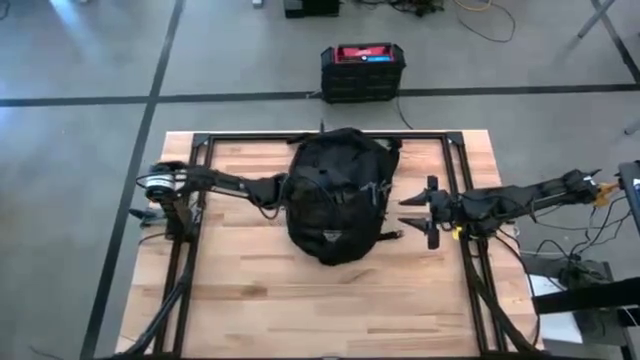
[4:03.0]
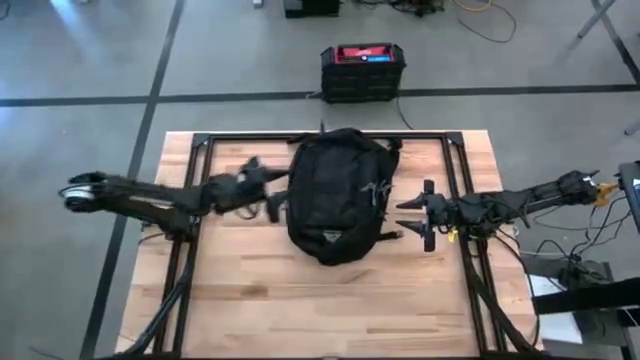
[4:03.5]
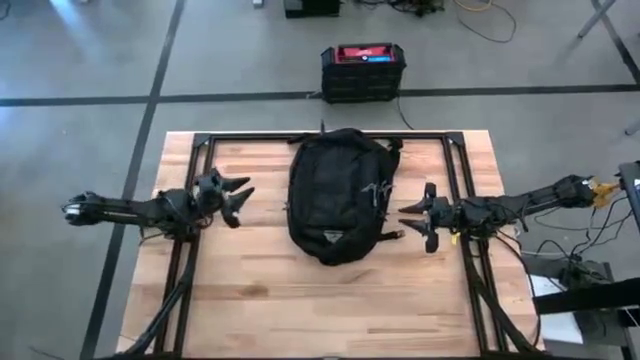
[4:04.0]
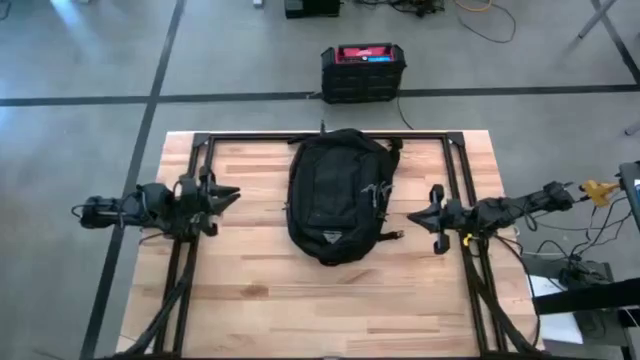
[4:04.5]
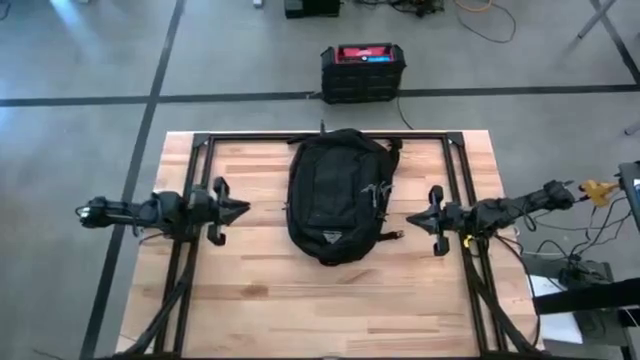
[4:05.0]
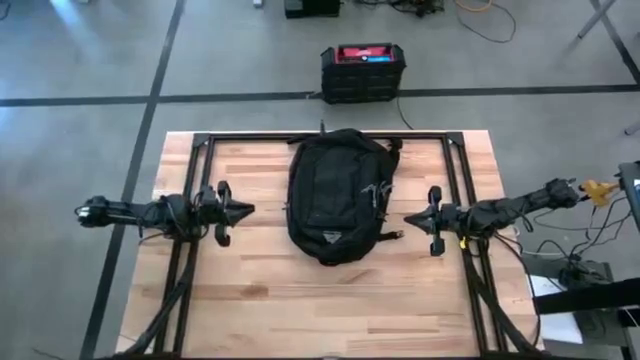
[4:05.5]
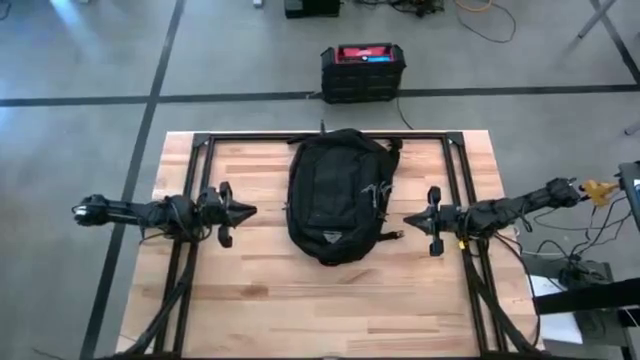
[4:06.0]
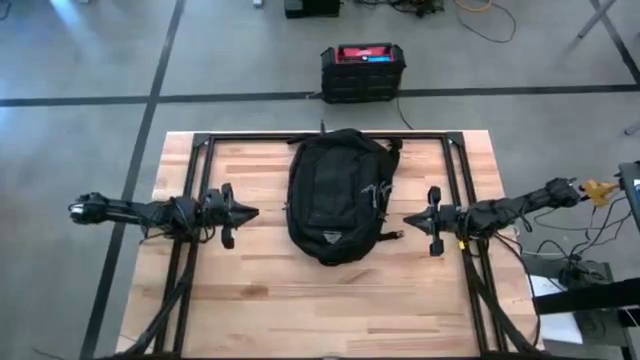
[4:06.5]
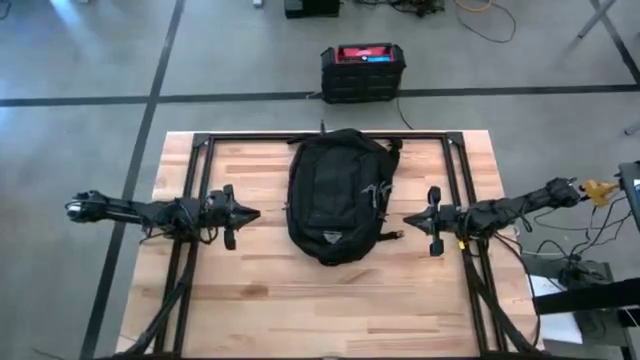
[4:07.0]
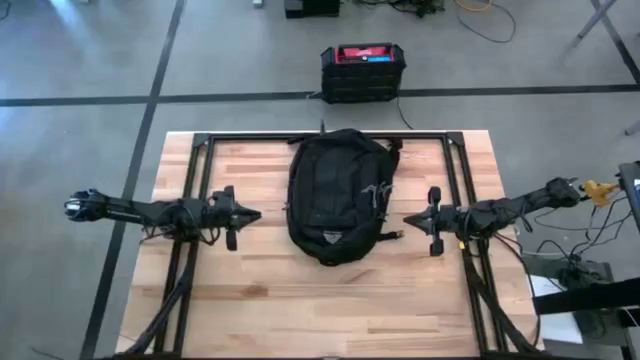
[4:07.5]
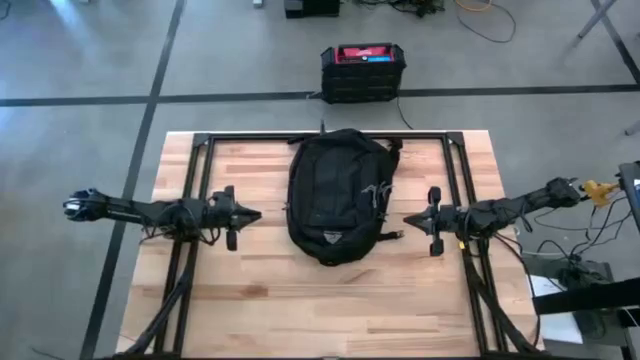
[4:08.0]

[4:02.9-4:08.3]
Task: Unpack backpack
Return to Home Position

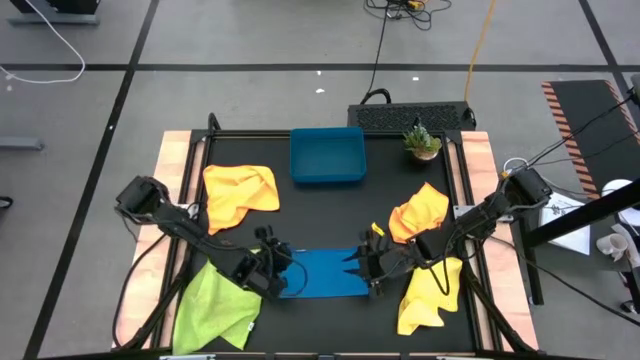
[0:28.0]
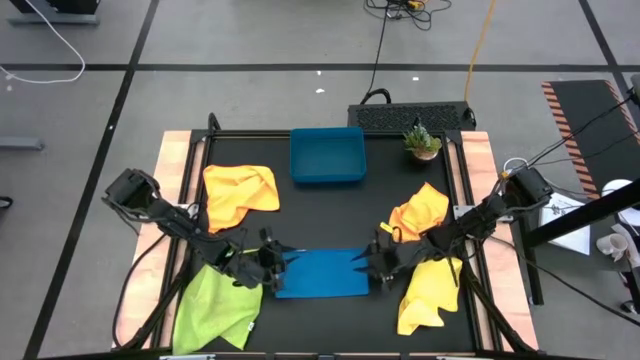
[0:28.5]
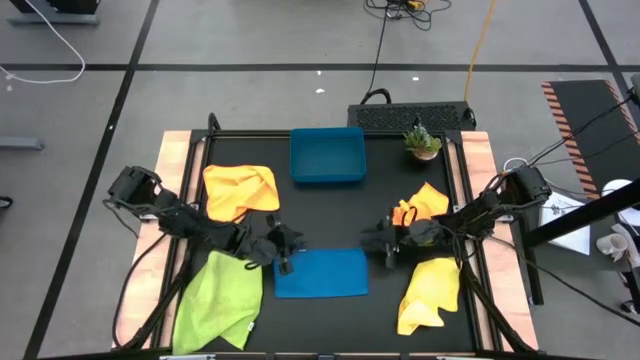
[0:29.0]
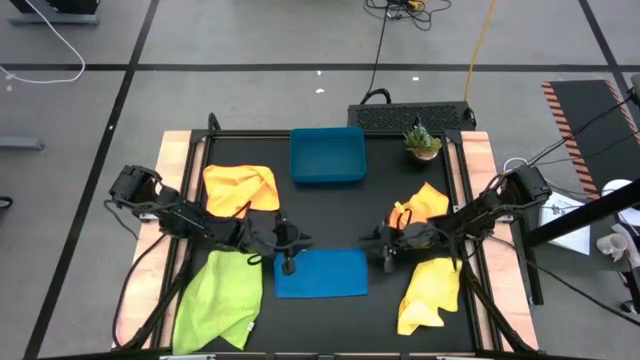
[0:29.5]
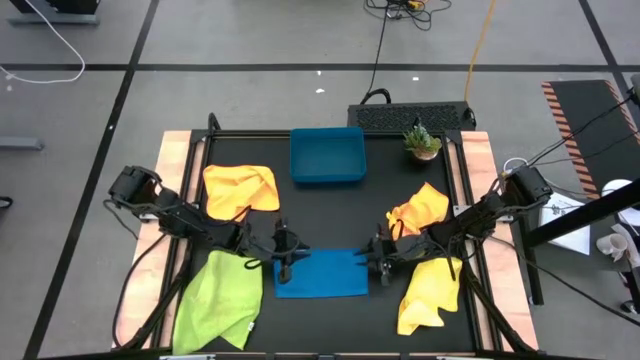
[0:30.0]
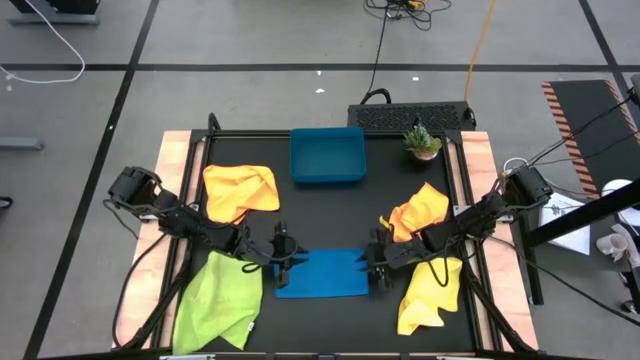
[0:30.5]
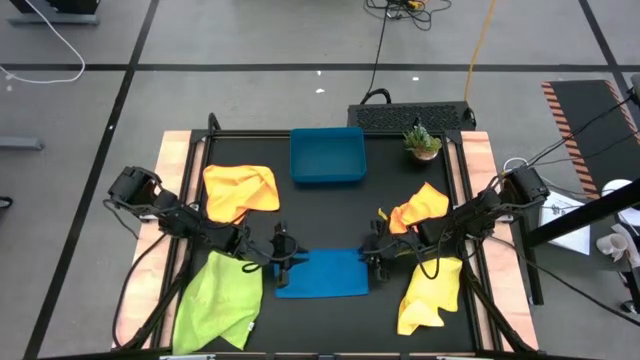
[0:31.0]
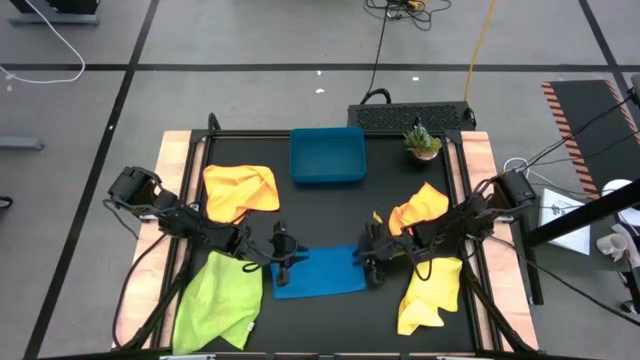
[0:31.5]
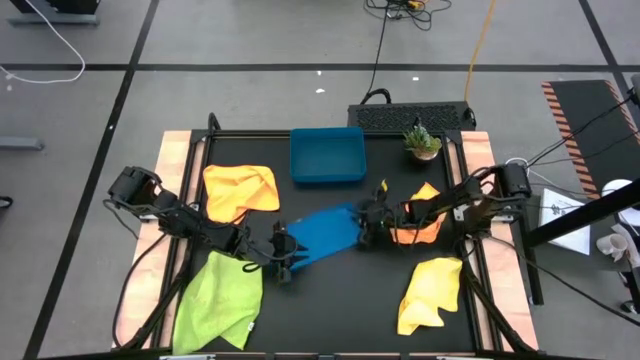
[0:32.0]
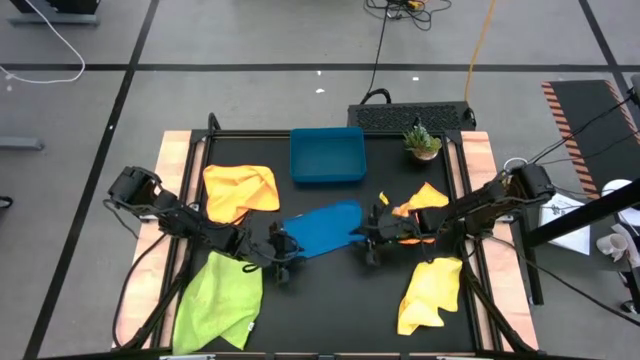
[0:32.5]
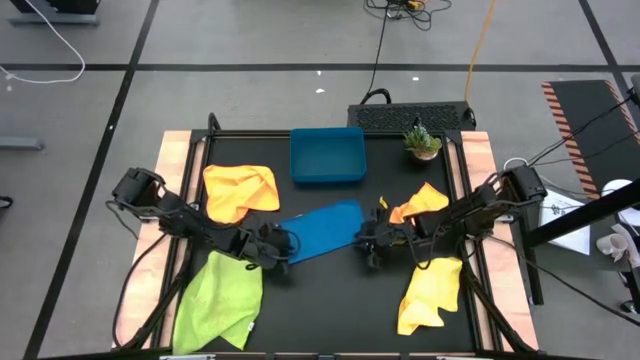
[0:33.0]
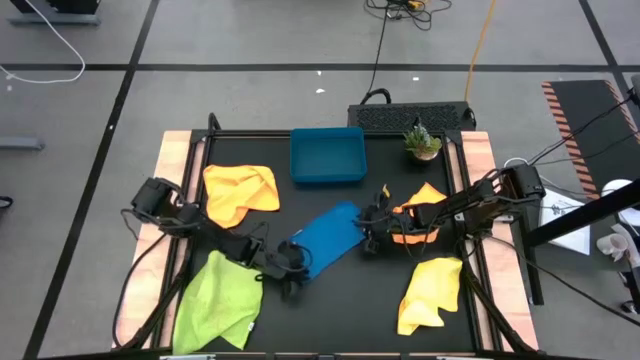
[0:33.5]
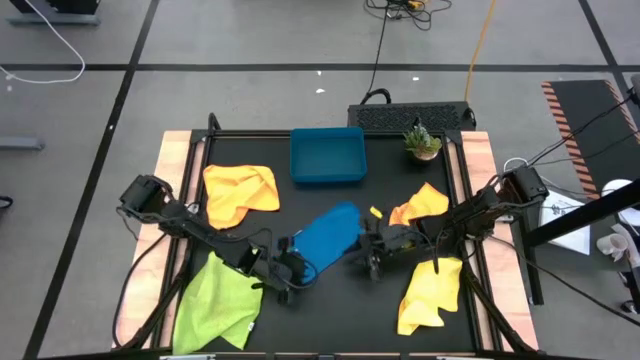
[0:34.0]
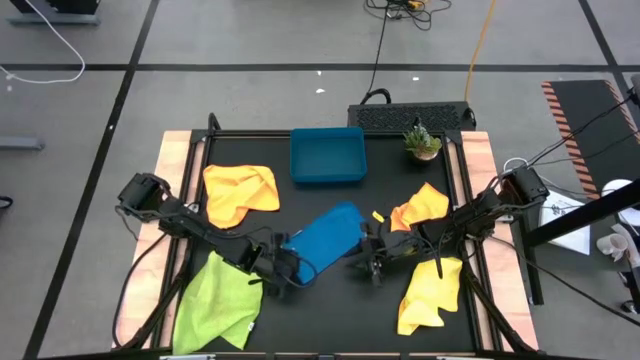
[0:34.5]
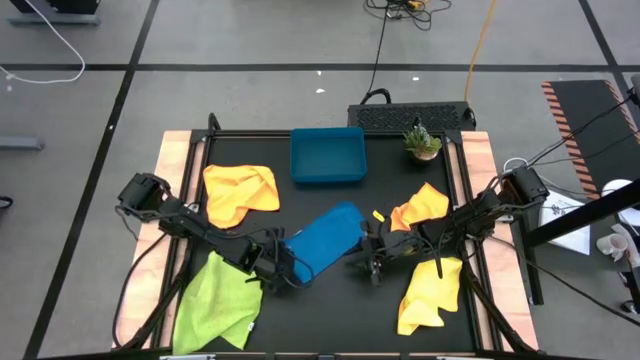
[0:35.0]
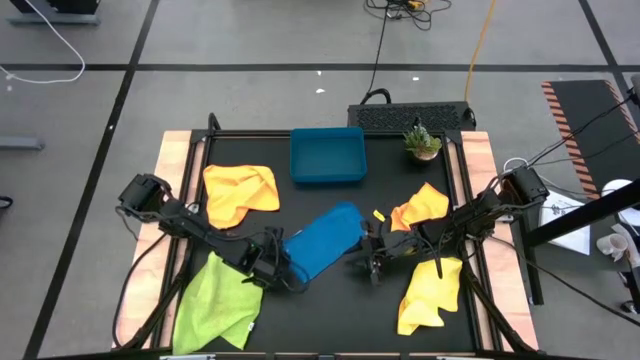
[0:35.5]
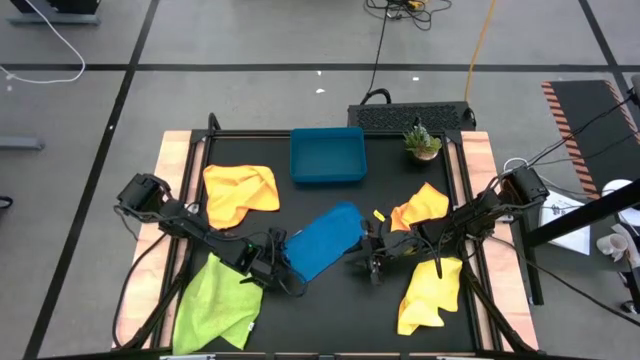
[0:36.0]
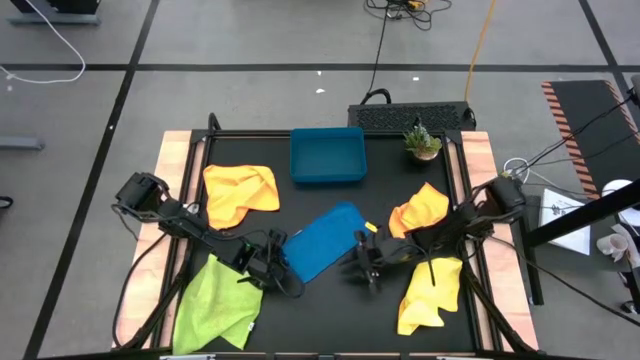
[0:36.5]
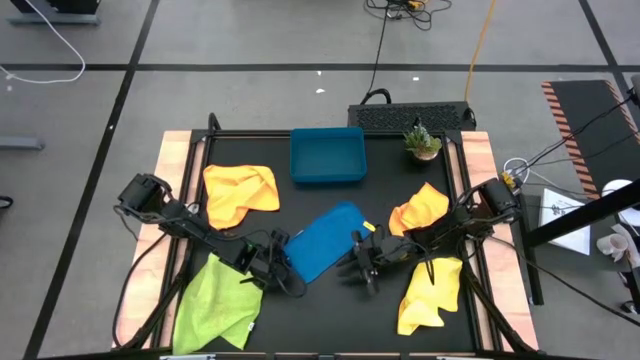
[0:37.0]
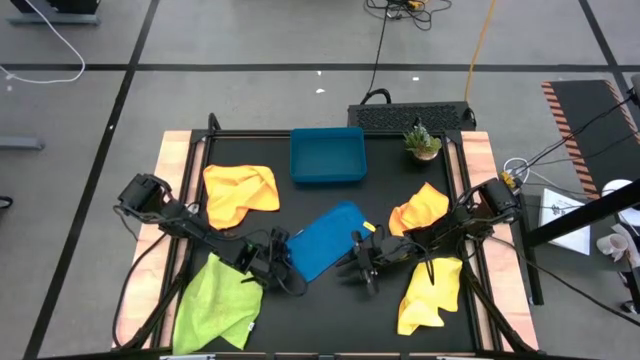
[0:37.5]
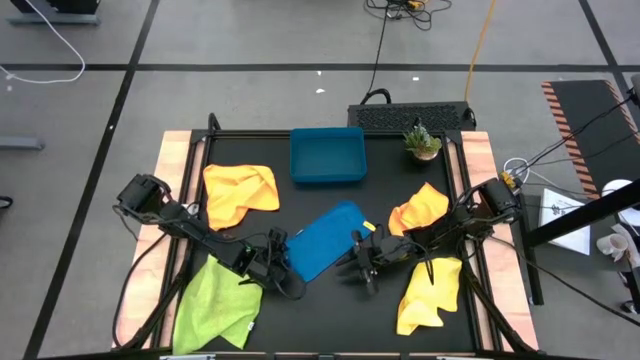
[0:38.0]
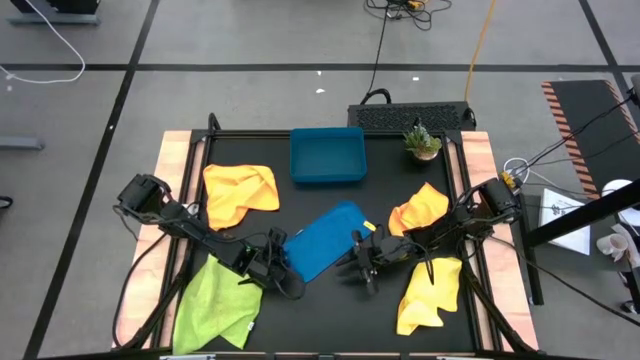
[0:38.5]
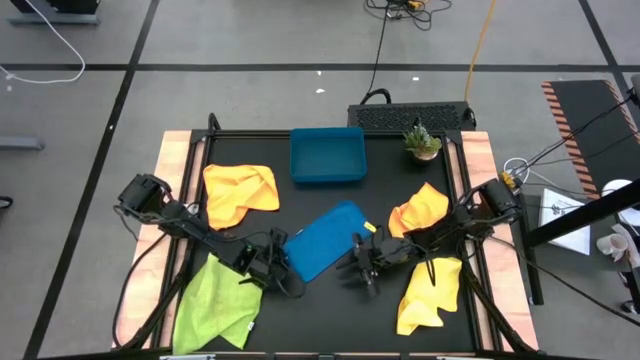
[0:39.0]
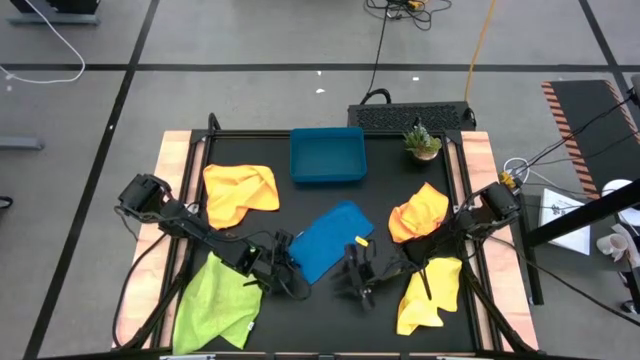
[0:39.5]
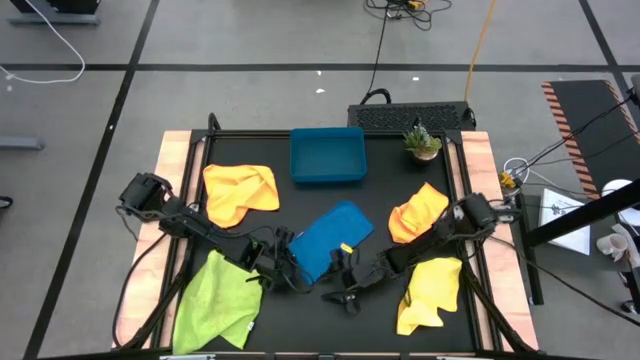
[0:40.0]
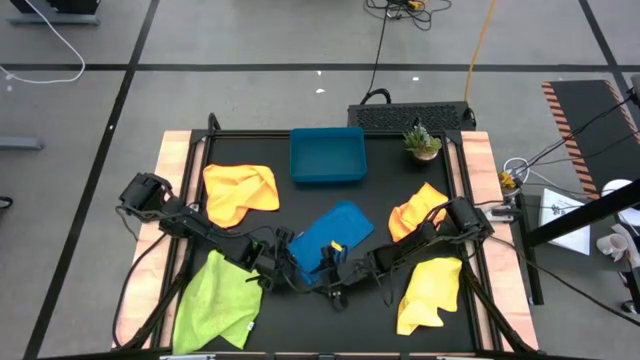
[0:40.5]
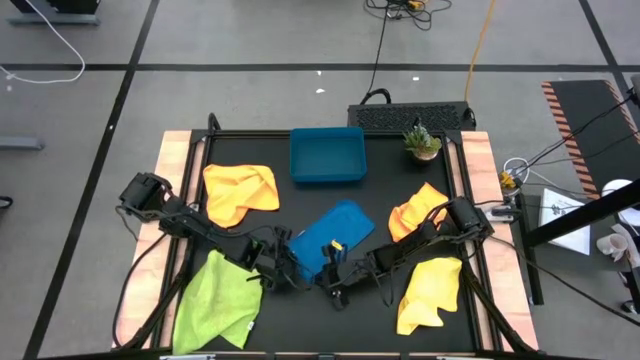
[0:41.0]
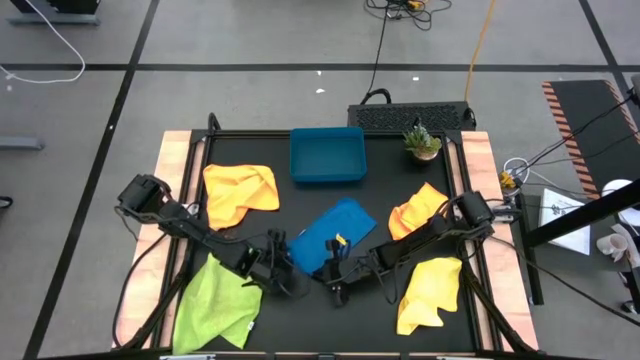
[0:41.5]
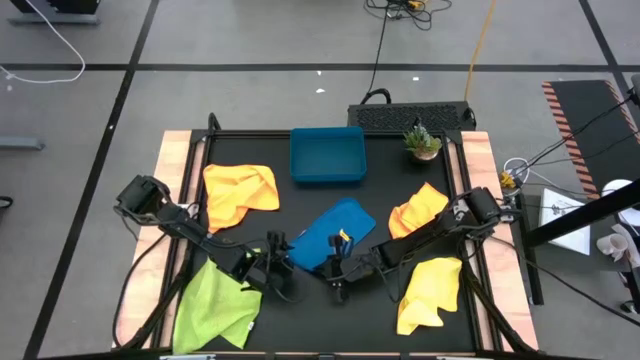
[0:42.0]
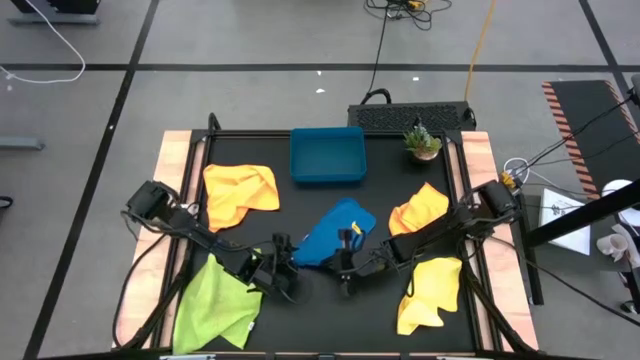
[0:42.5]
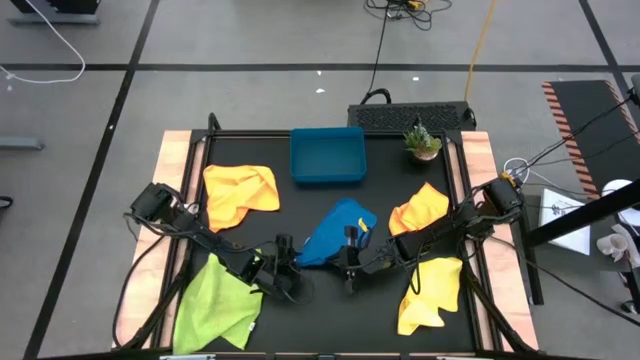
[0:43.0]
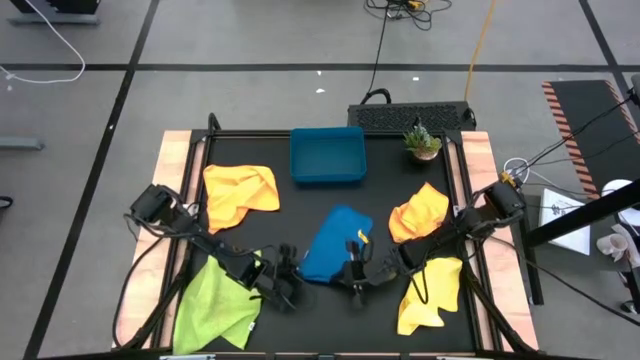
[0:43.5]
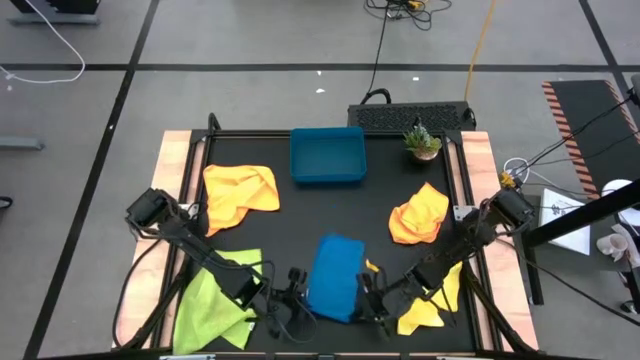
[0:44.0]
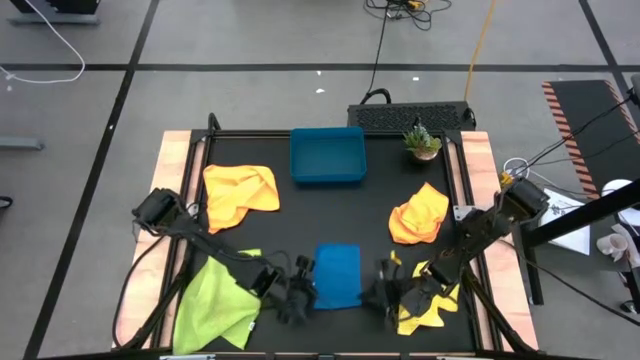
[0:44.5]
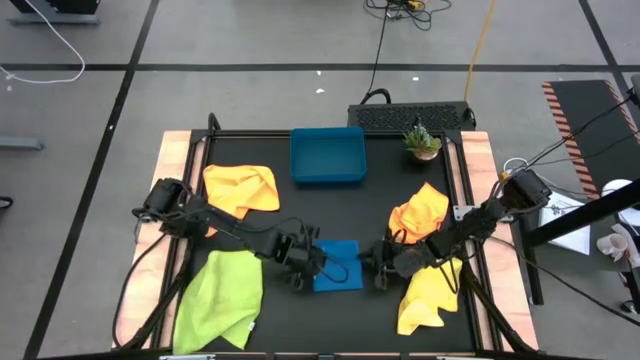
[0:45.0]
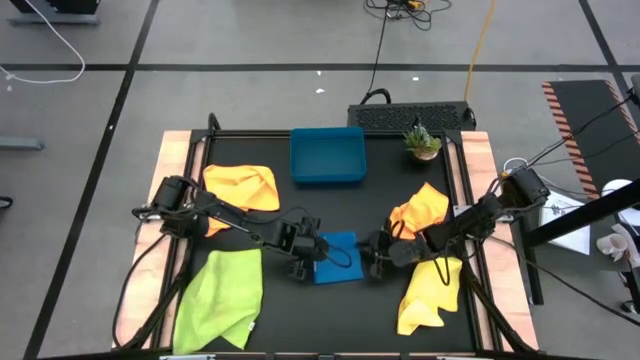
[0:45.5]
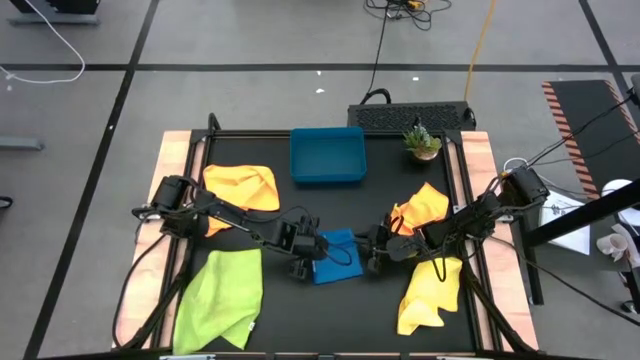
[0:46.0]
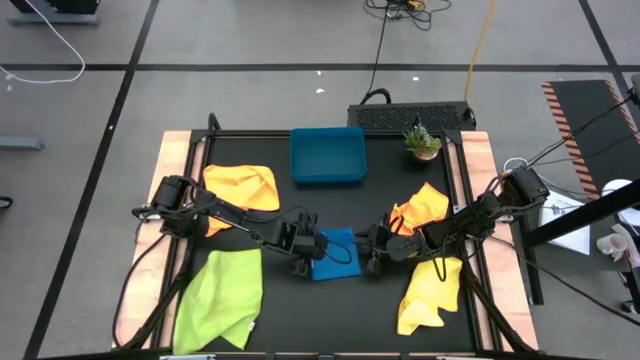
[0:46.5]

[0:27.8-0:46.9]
Task: Fold microfiber towels
Fold the blue microfiber cloth
